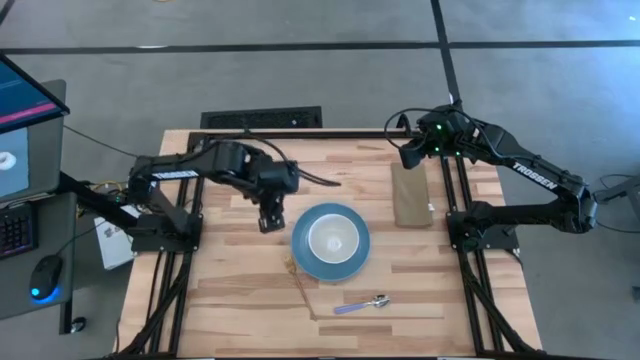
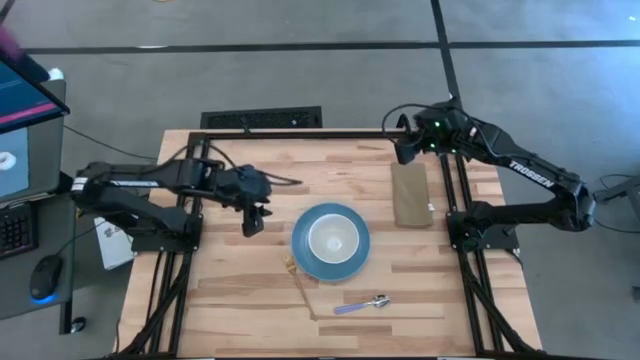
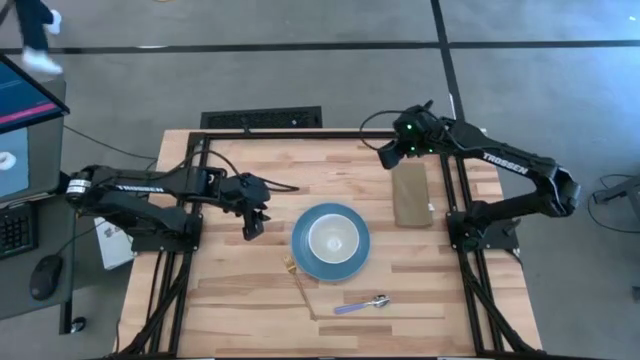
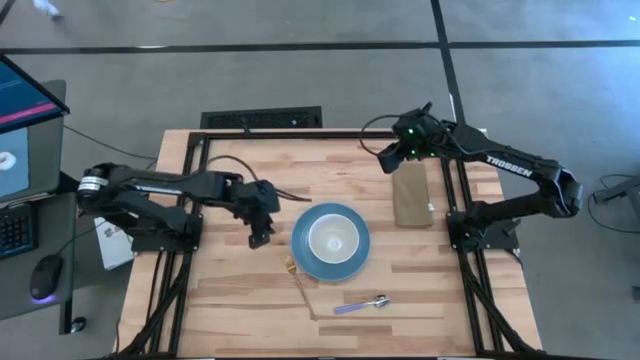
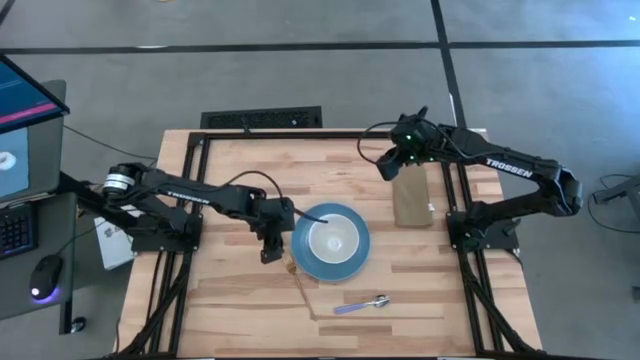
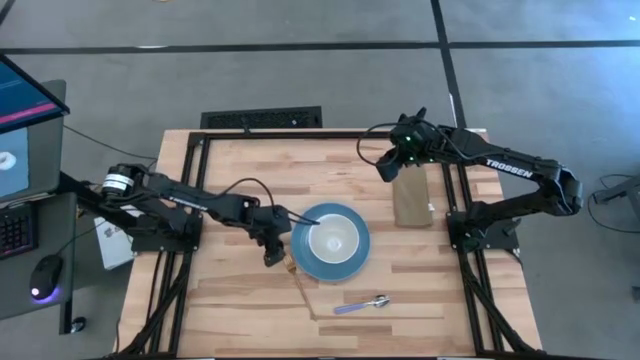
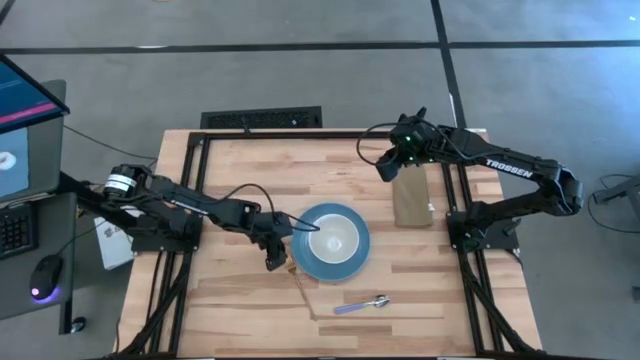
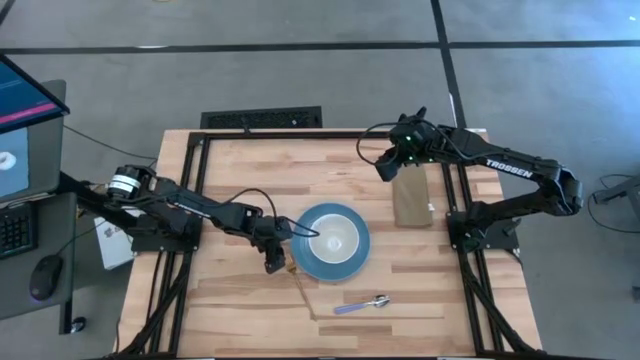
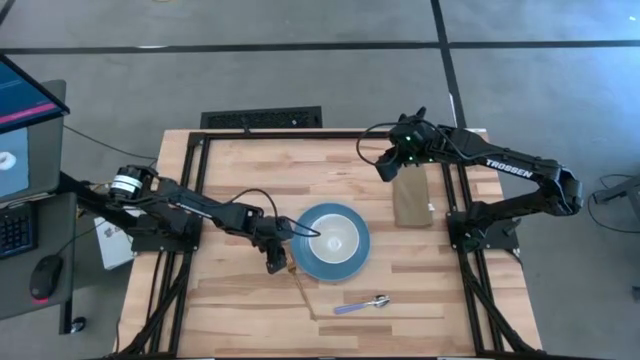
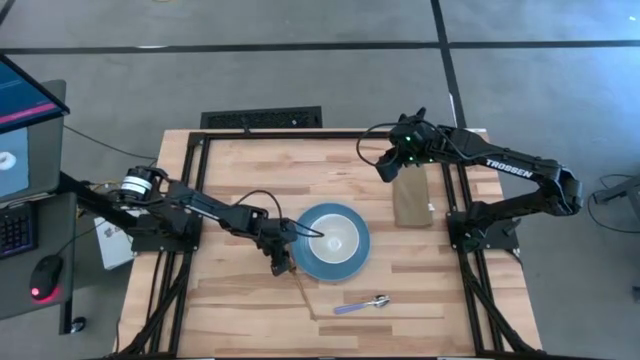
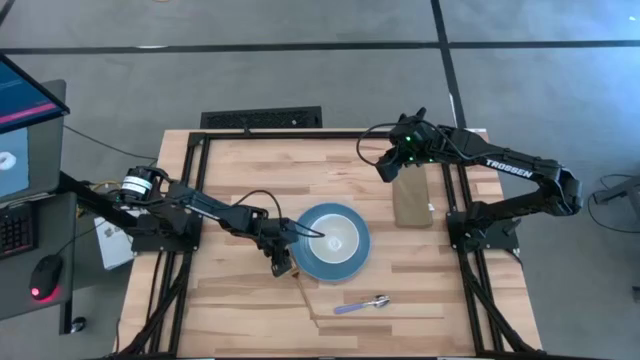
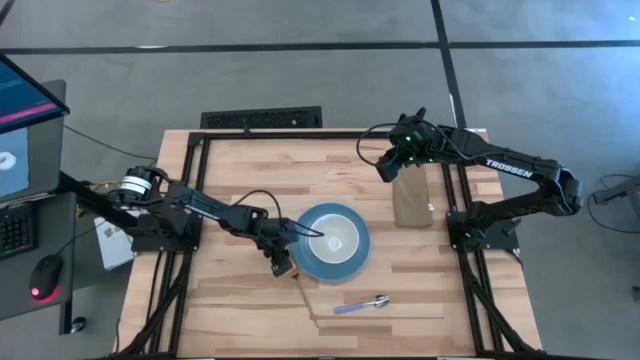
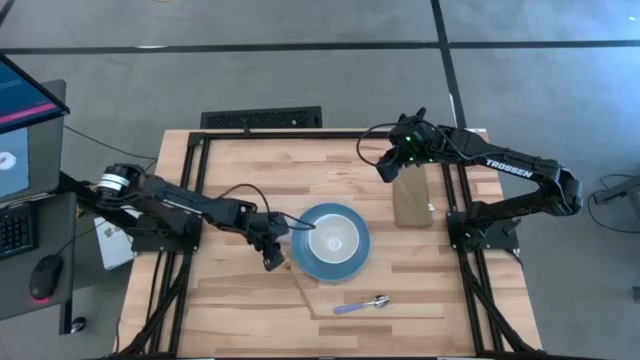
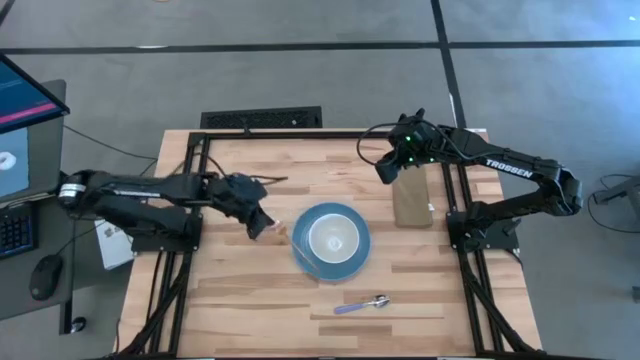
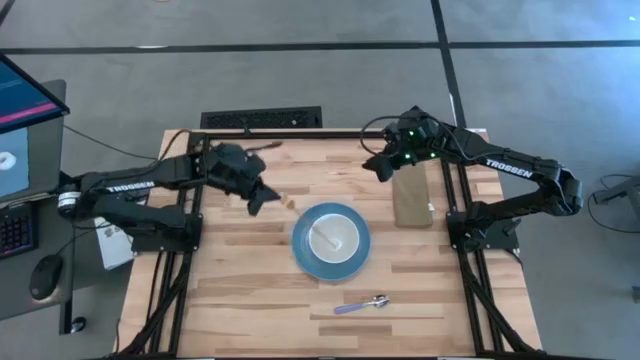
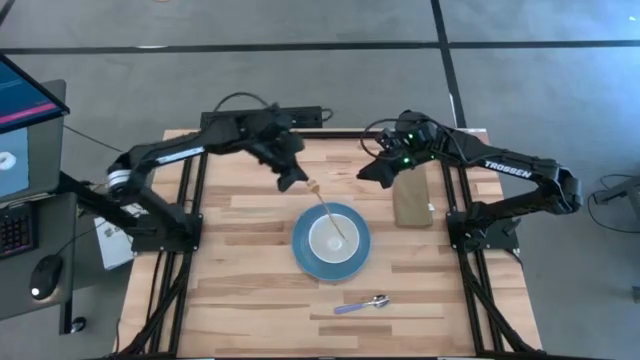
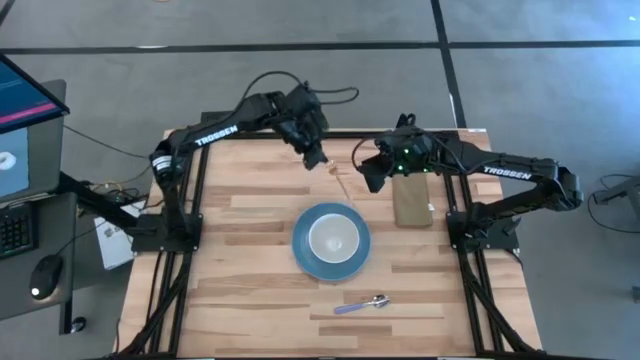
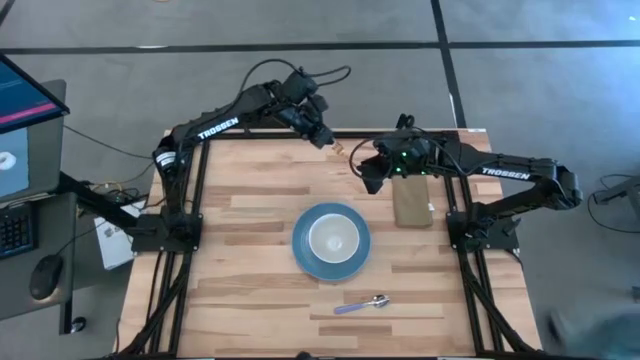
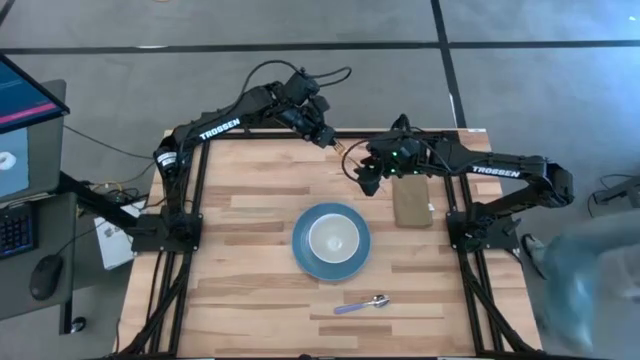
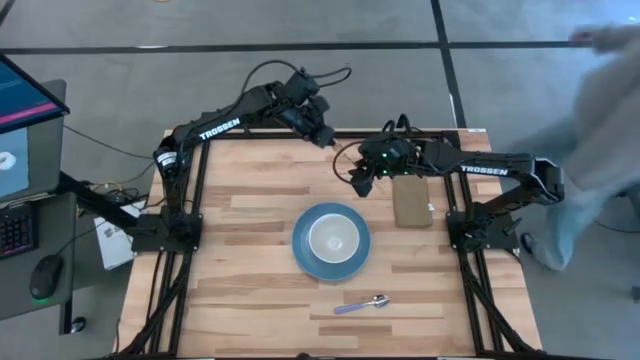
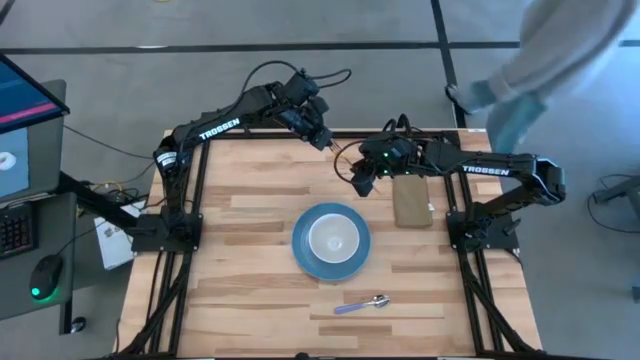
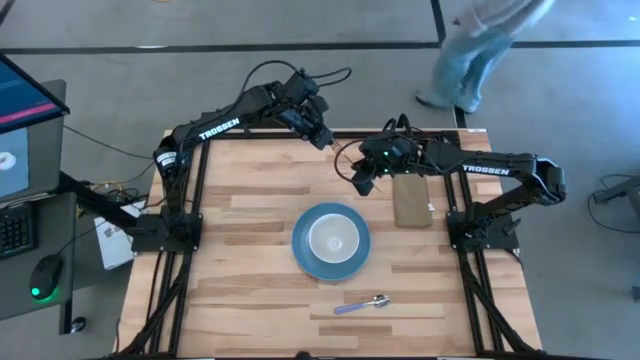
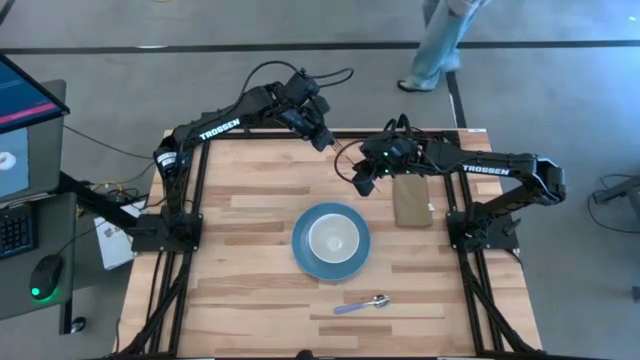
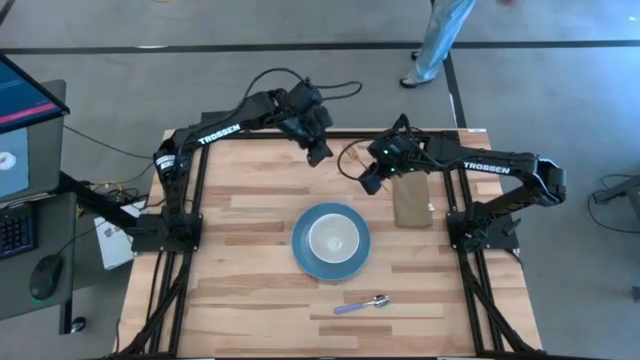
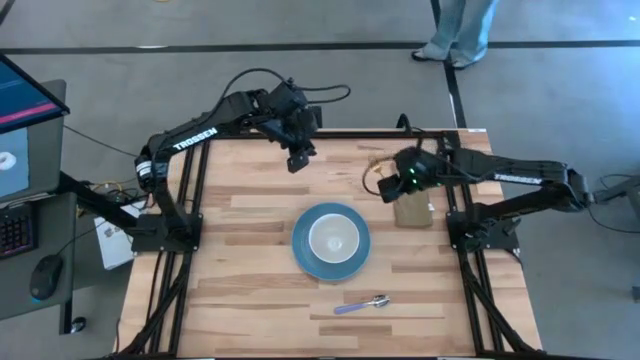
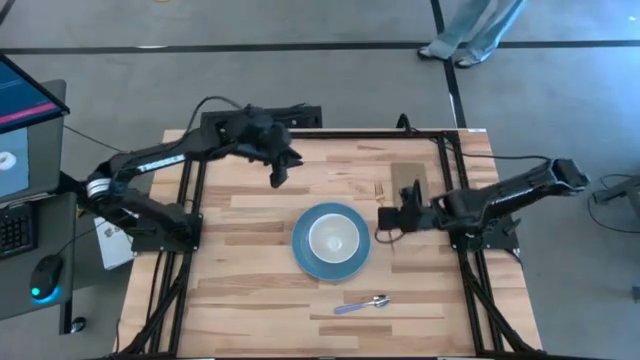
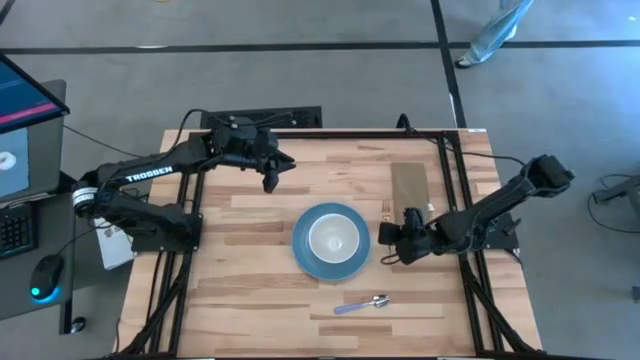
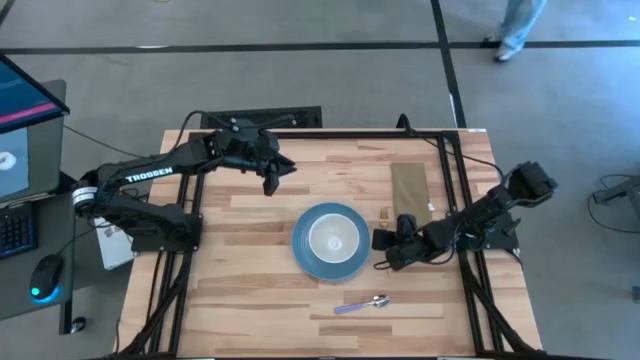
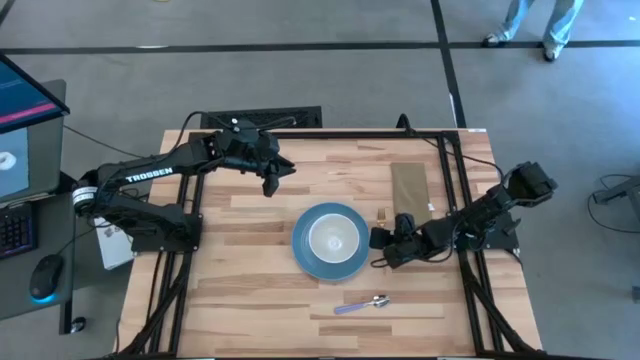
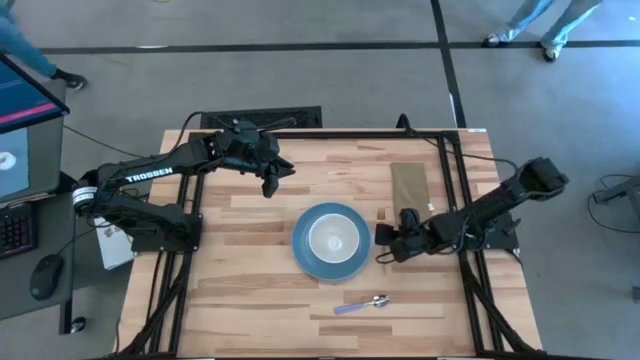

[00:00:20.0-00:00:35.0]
Task: Set table place
Place the gold fork inside the white bowl

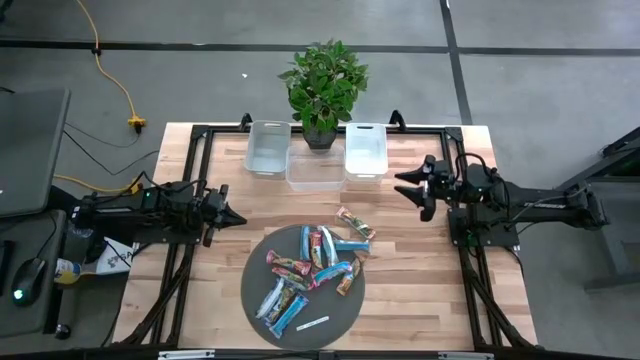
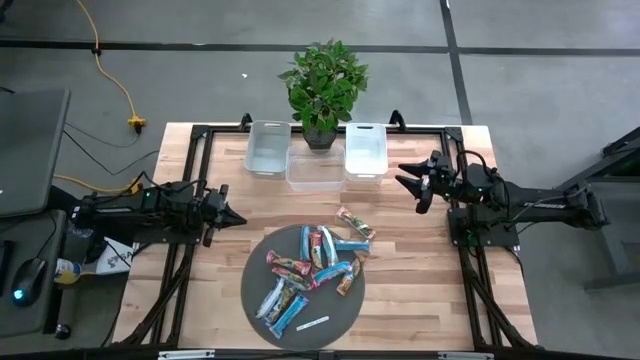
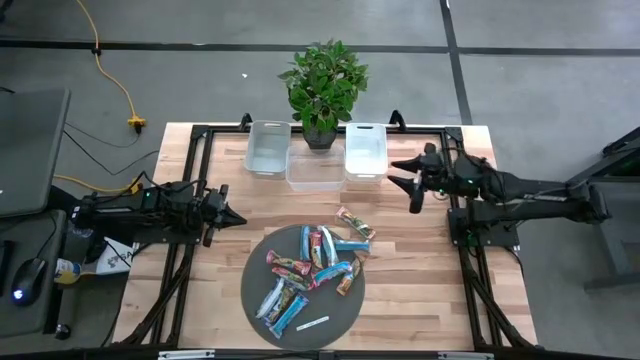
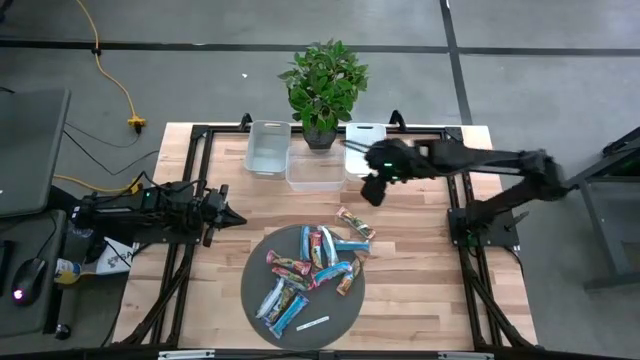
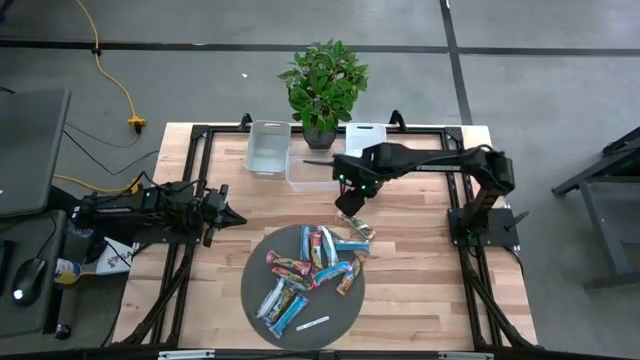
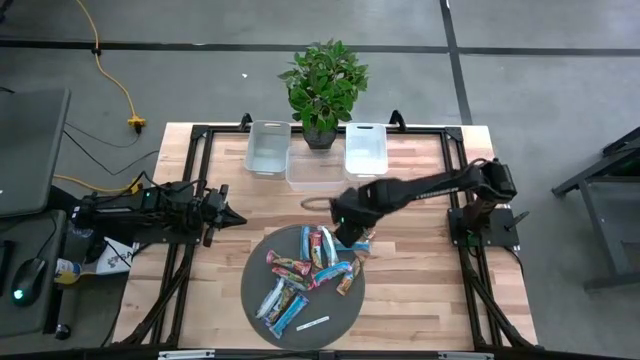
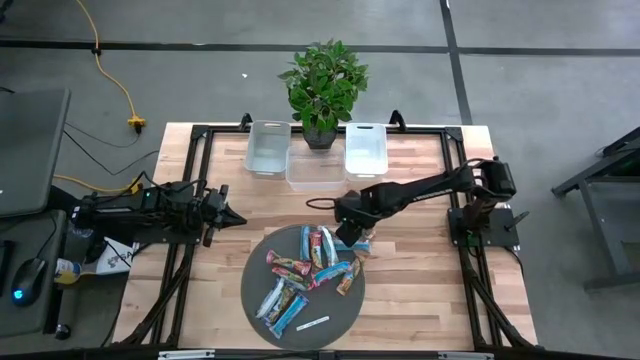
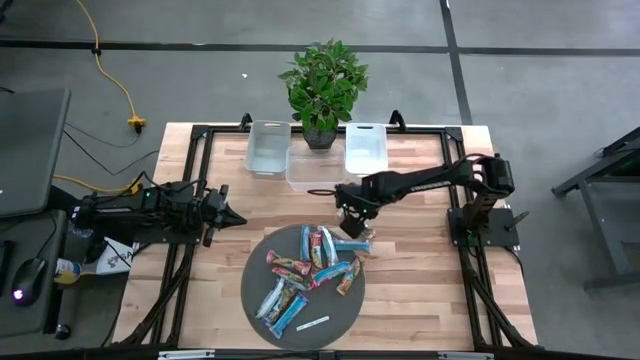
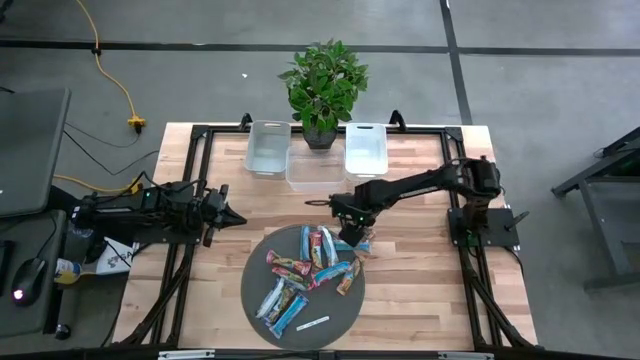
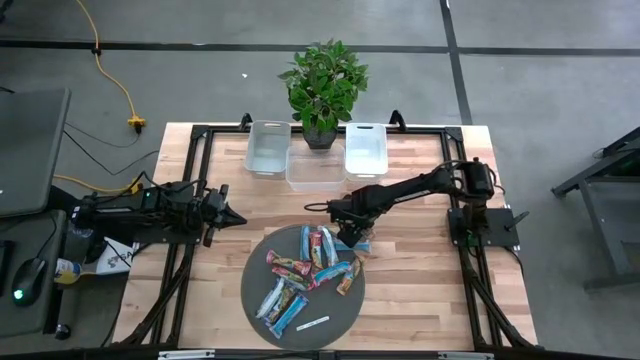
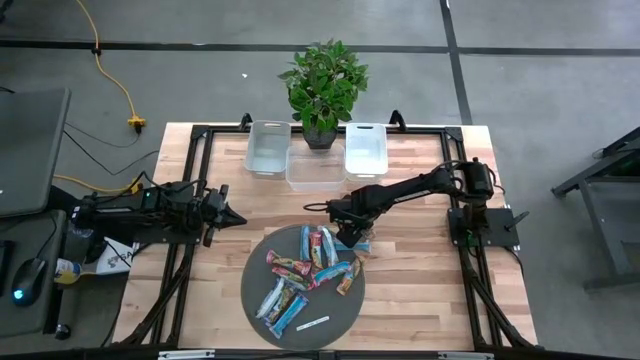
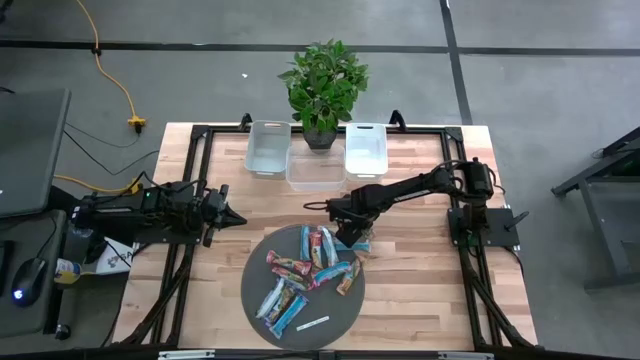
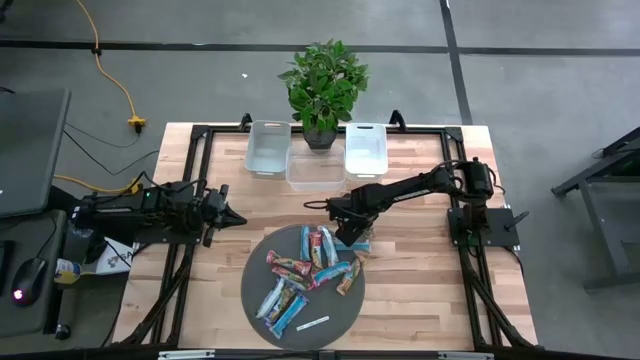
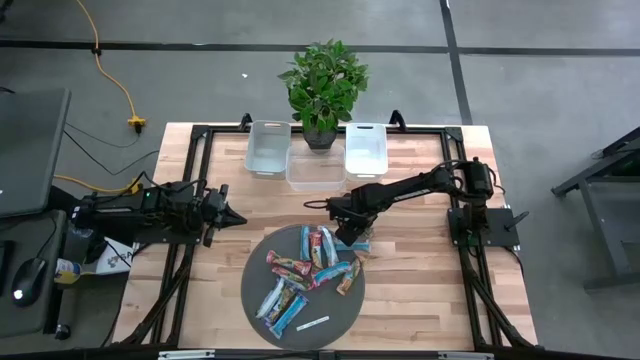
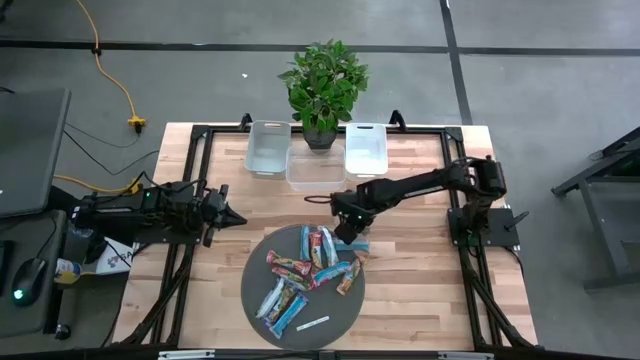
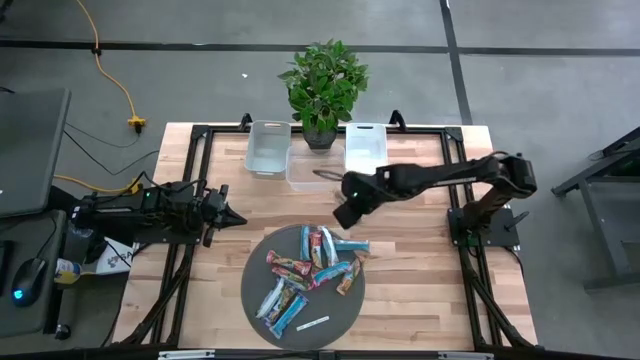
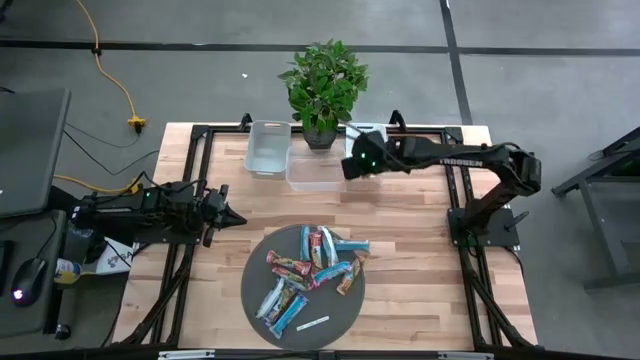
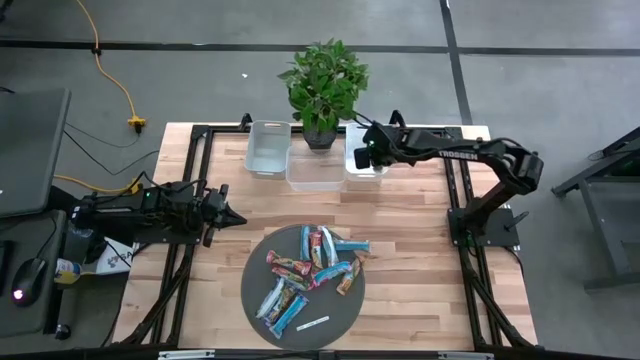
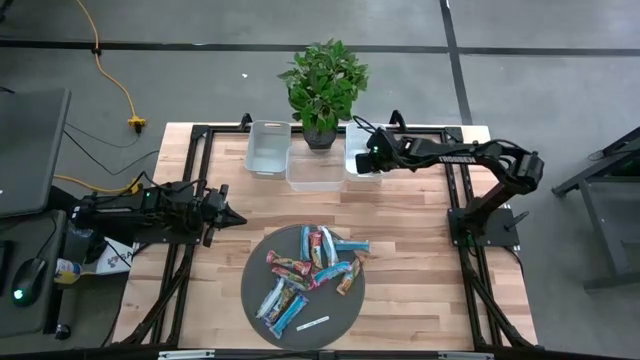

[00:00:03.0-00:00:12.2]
Task: Pick and place Granola Bars by type
Put the yellow granola bar into the white bin
